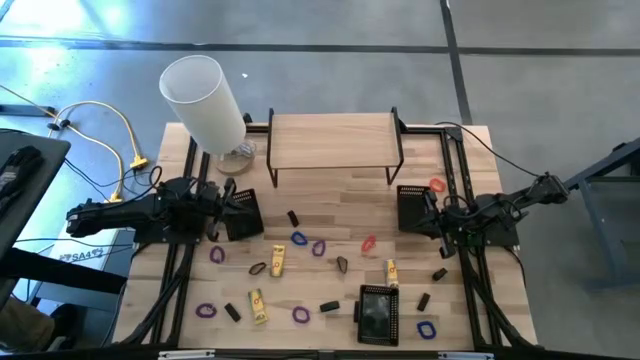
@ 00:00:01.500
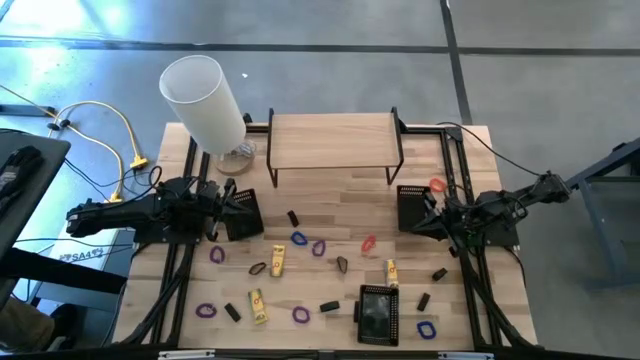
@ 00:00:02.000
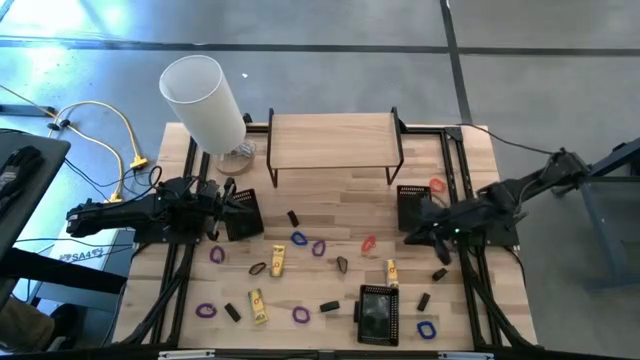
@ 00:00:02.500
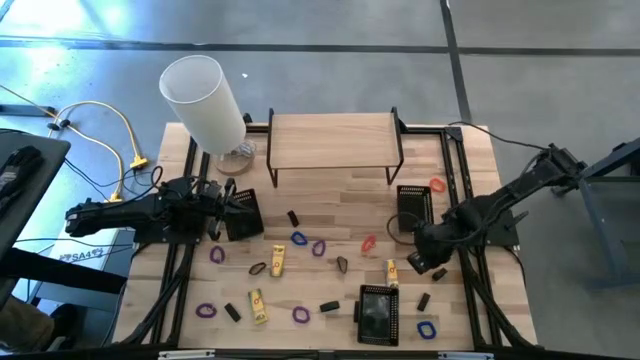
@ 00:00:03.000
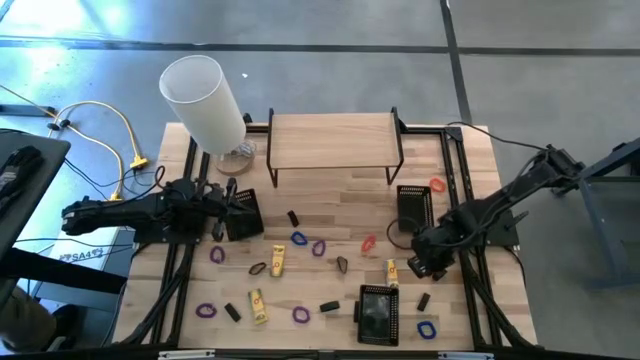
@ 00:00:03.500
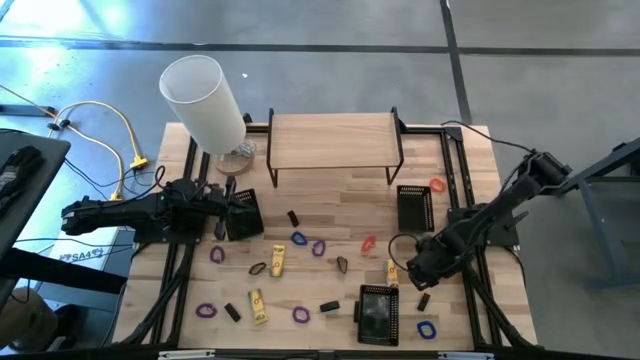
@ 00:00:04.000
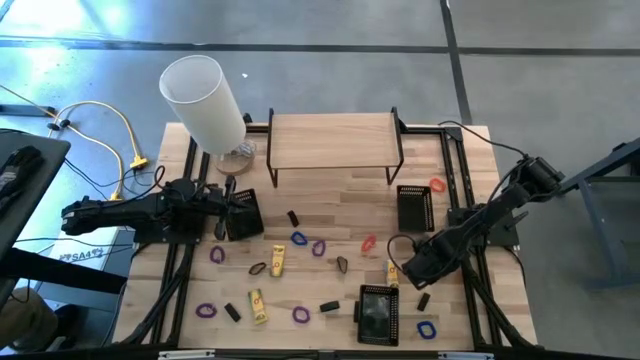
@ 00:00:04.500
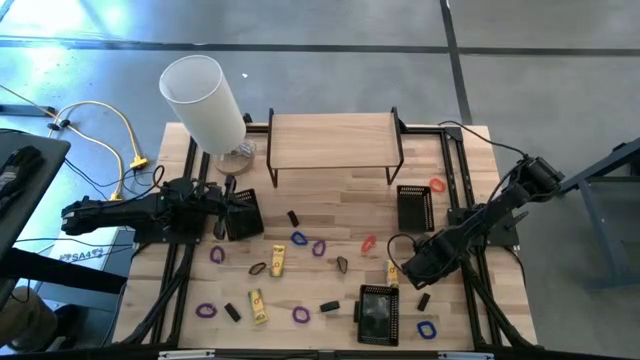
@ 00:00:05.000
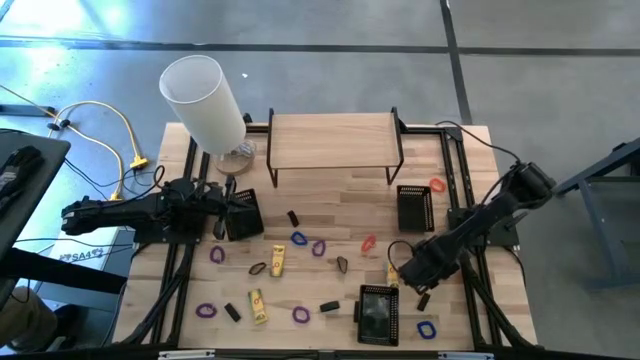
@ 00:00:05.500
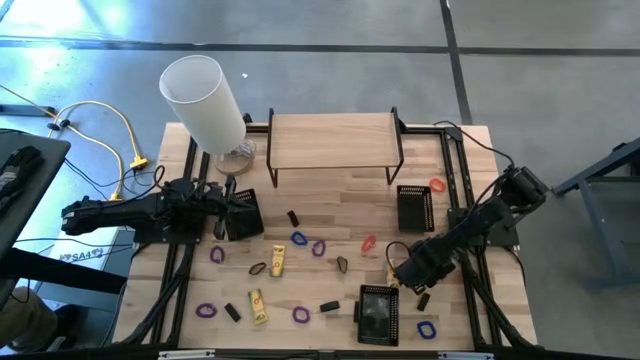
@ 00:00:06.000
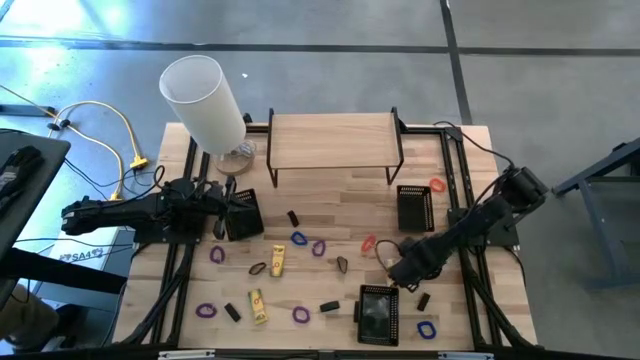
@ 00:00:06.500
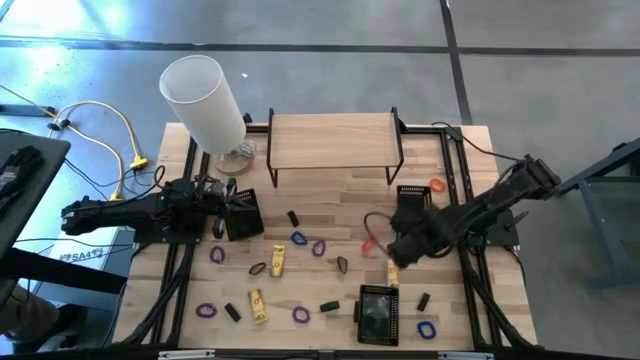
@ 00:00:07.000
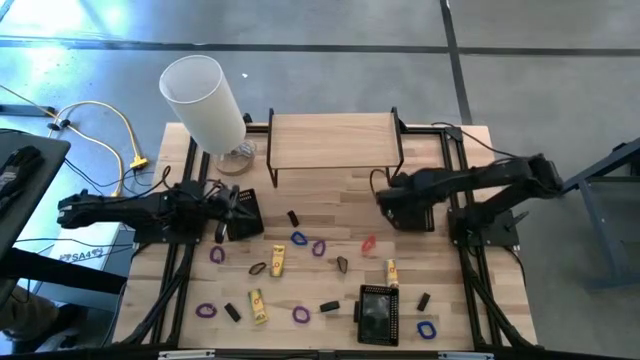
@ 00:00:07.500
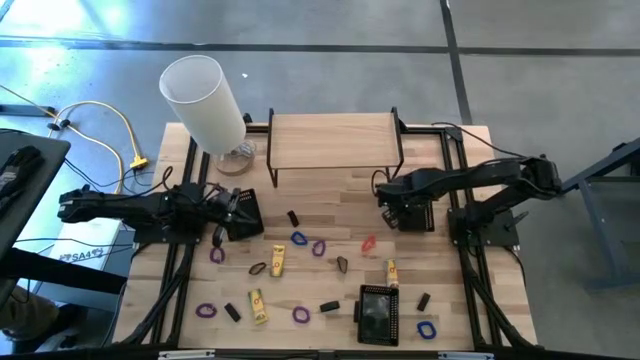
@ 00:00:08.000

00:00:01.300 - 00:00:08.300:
Task: Pick & Place Office Desk Supplies
Put the rubber band into the top right bin

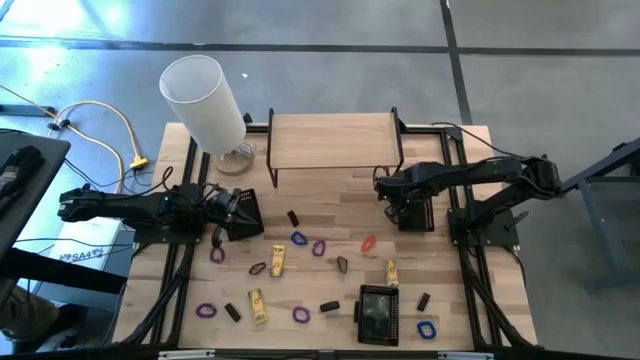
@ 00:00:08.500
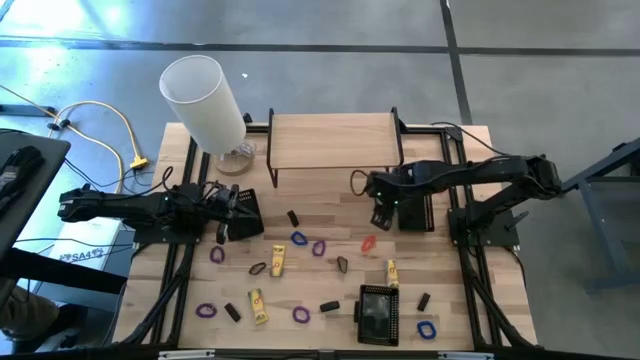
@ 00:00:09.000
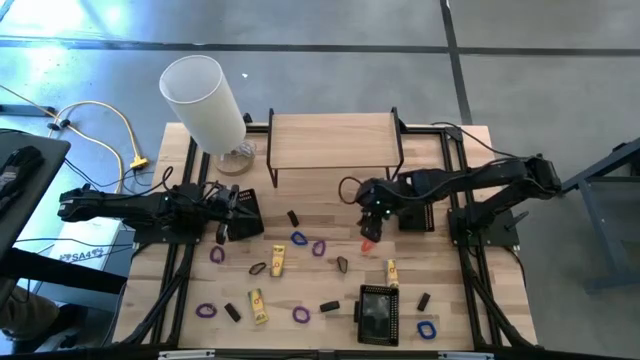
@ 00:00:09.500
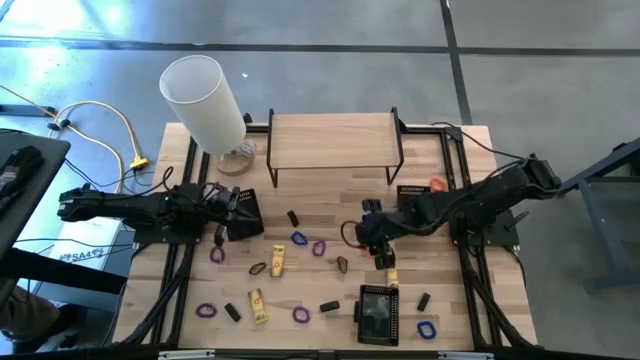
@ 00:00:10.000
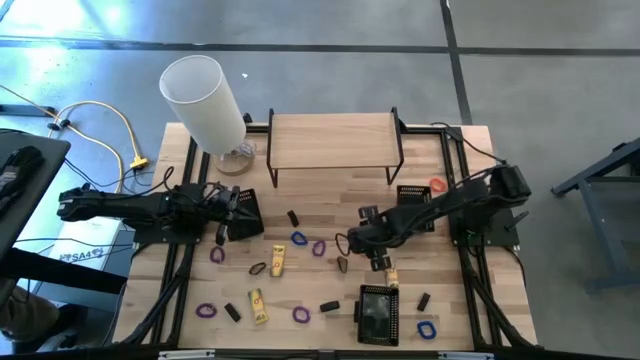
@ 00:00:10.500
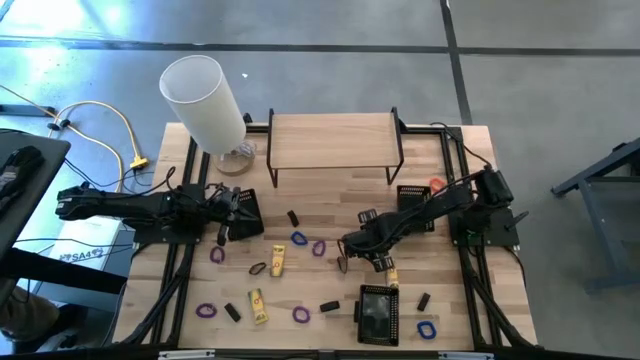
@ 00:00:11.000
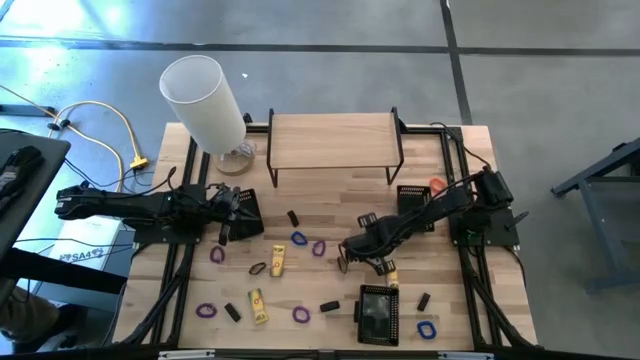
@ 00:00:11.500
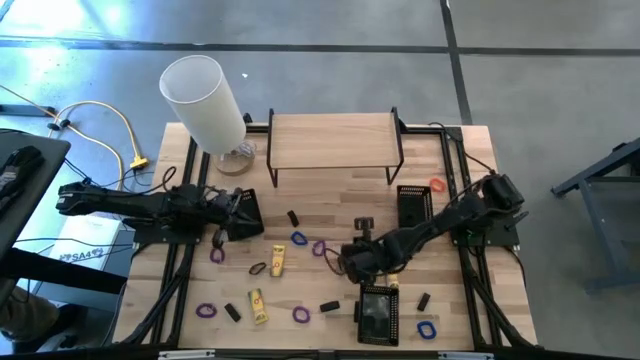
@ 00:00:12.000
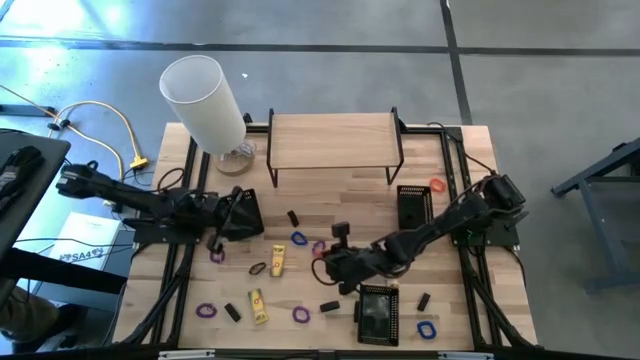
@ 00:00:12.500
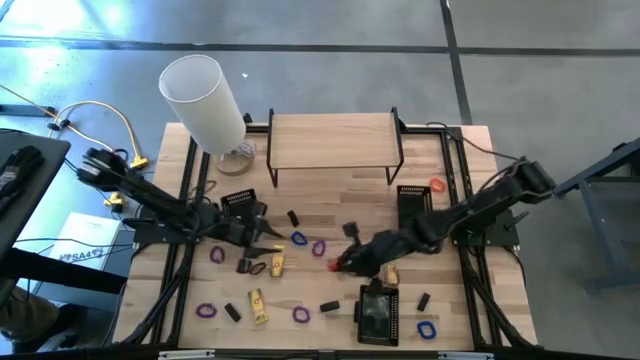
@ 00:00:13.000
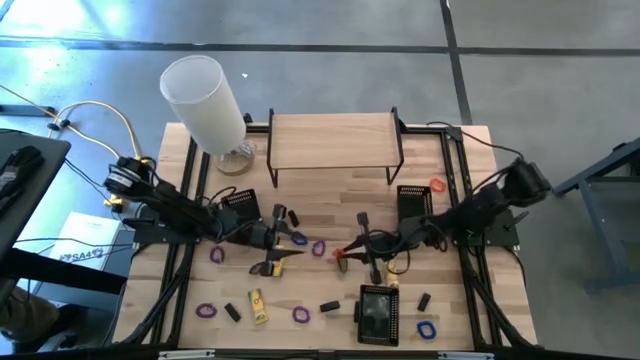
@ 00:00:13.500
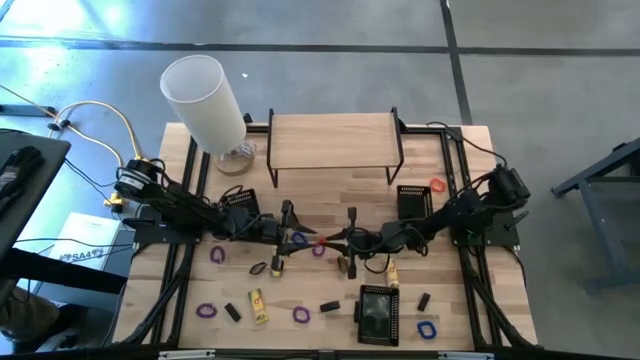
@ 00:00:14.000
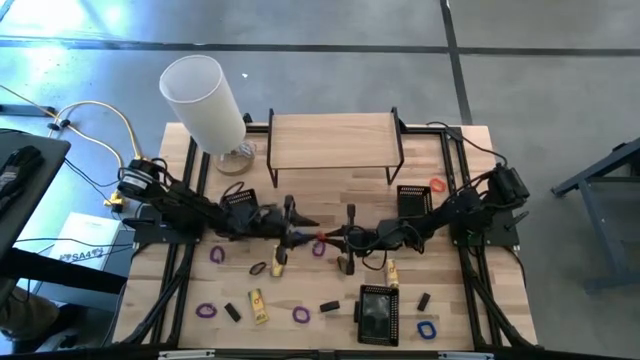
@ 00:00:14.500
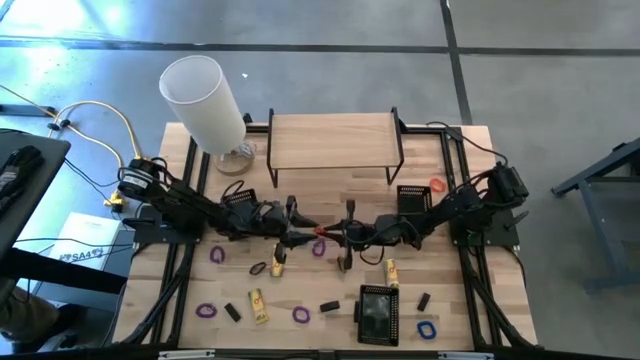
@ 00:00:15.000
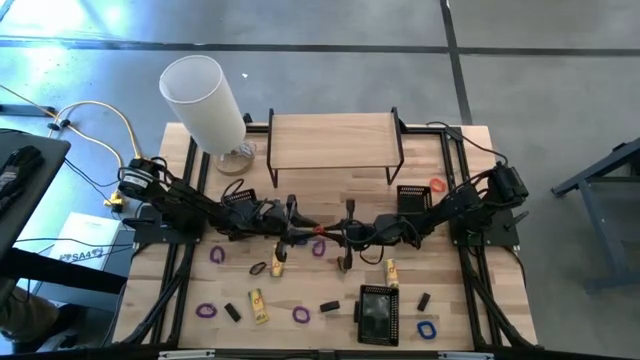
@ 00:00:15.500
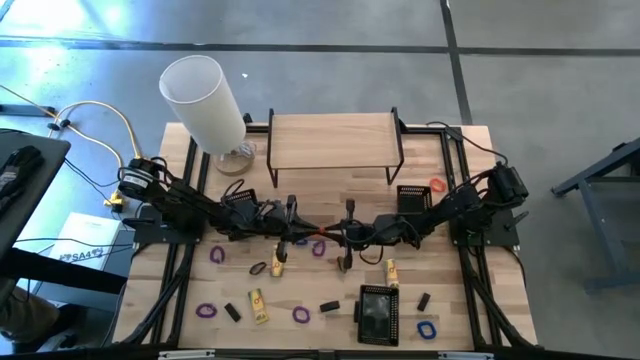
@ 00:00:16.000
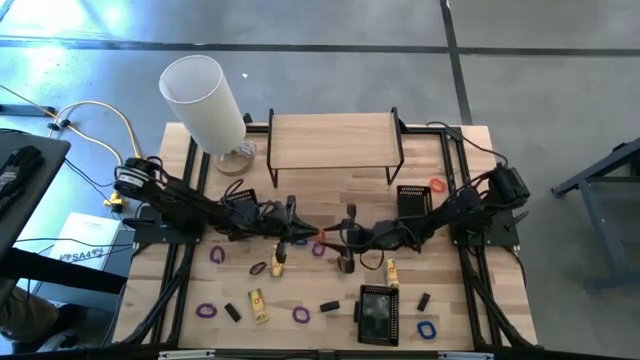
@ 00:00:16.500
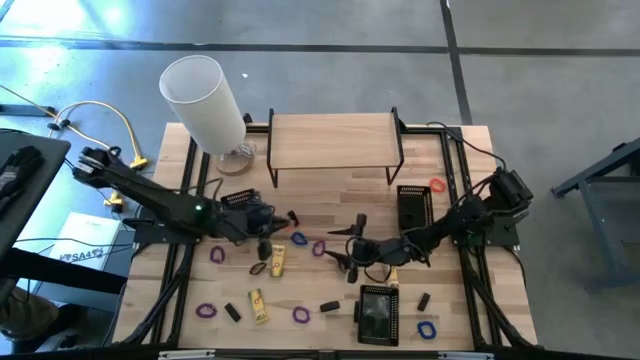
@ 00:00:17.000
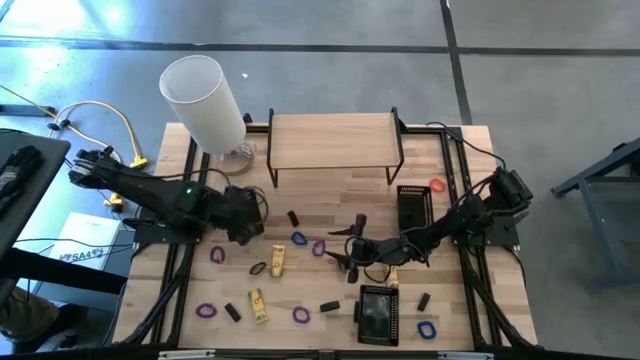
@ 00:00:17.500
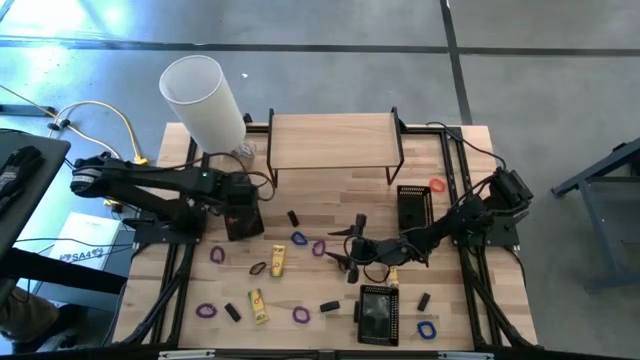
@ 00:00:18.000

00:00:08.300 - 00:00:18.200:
Put the bottom orange spiral keychain into the top left bin

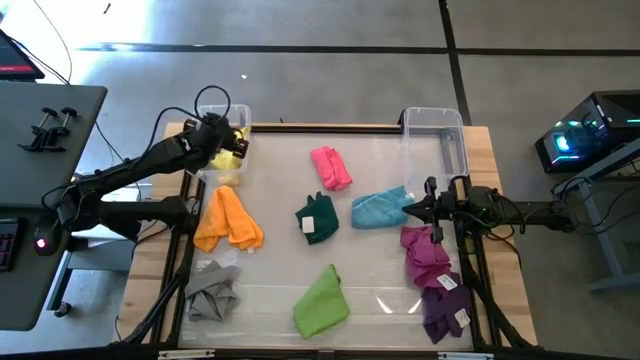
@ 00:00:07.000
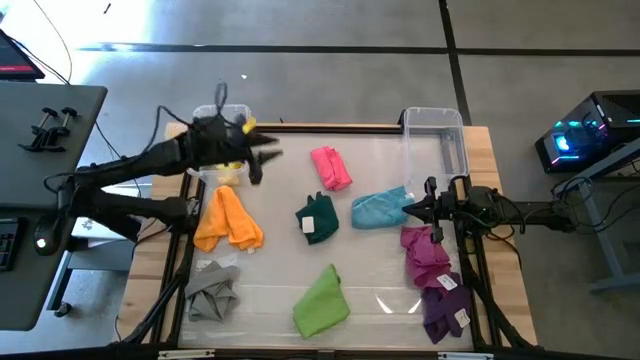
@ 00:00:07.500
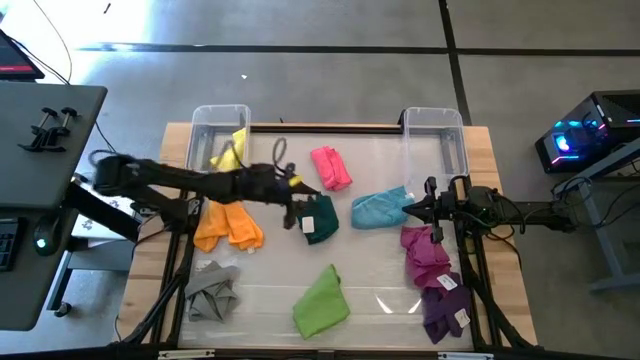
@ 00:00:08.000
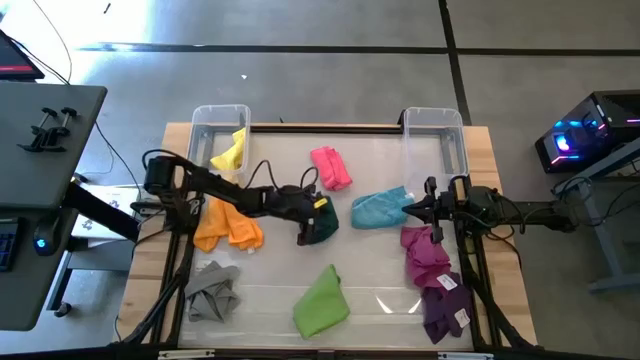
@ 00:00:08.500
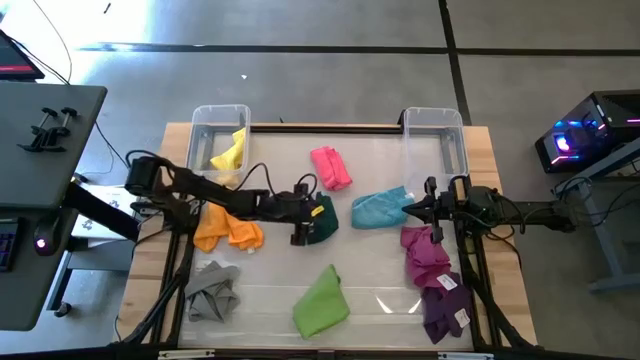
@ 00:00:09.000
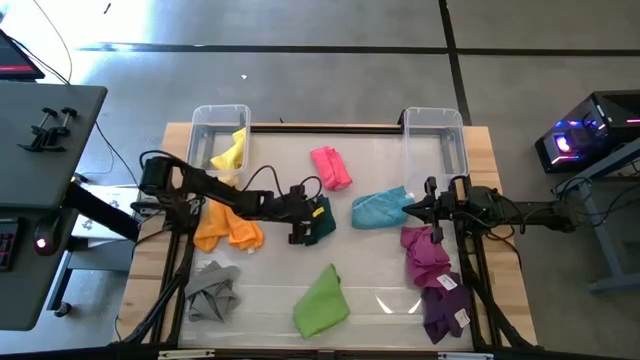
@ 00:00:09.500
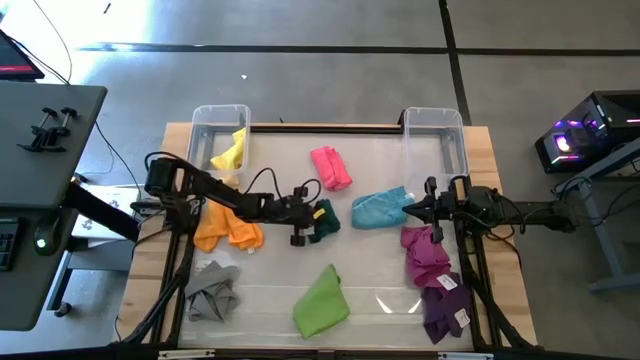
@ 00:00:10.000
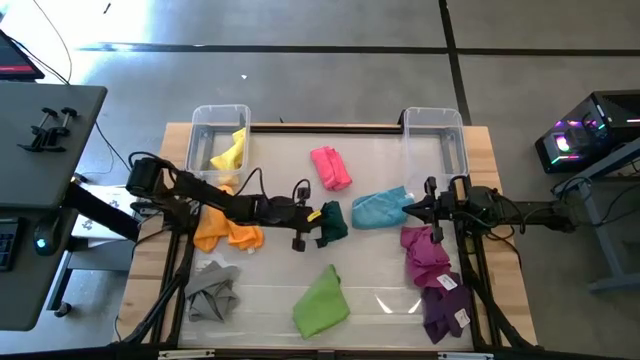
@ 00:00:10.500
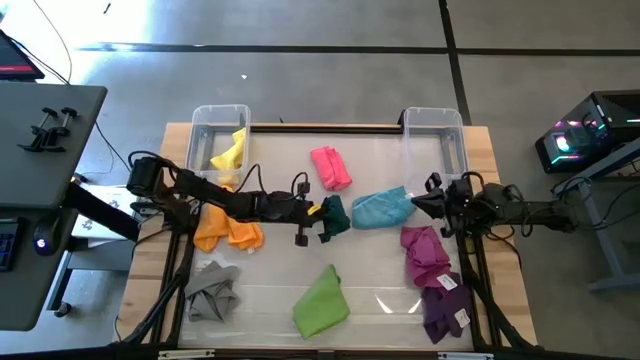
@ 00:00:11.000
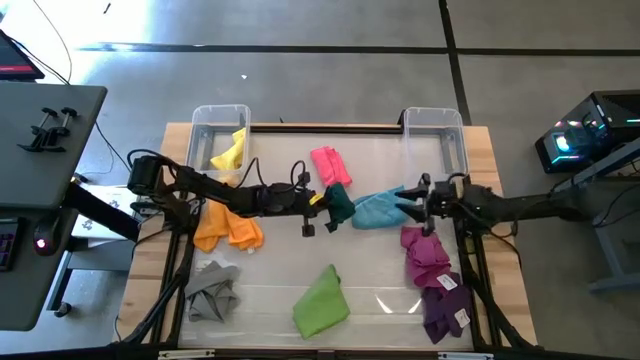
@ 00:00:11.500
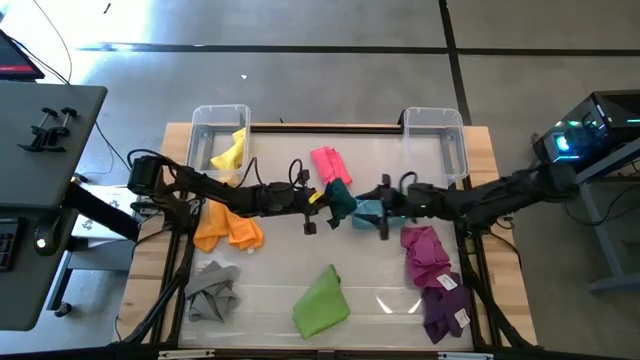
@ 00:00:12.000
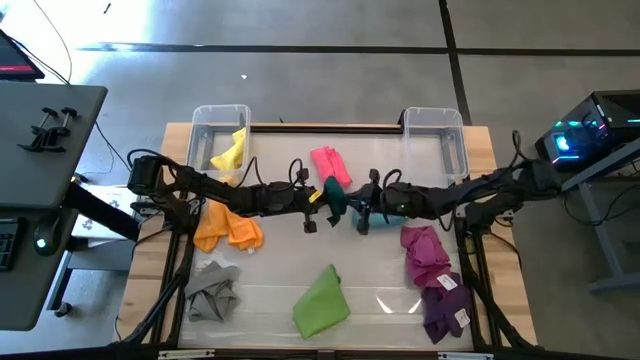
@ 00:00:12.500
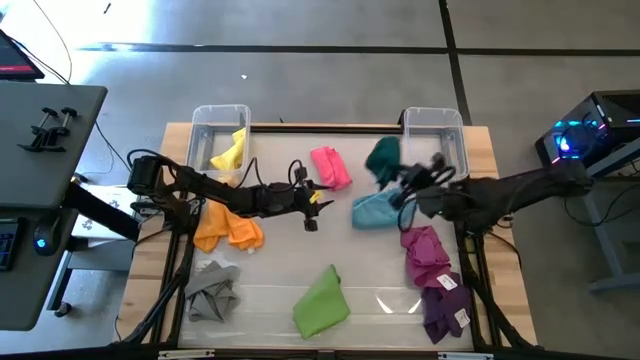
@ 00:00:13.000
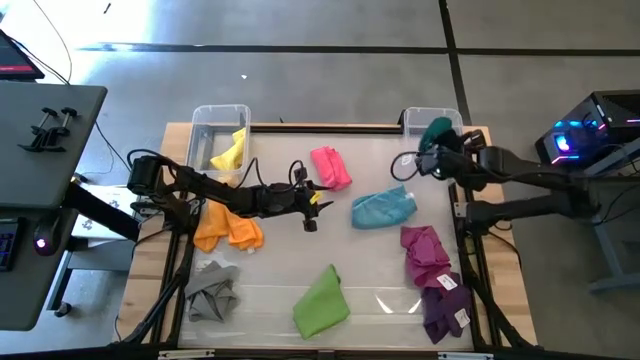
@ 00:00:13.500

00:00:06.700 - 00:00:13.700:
Task: Sort towels by color in basket
Put the dark green towel into the right transparent bin
